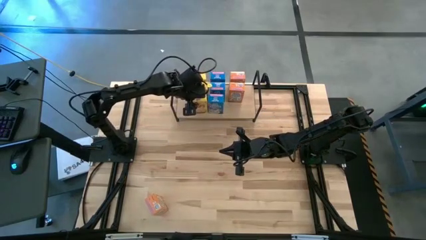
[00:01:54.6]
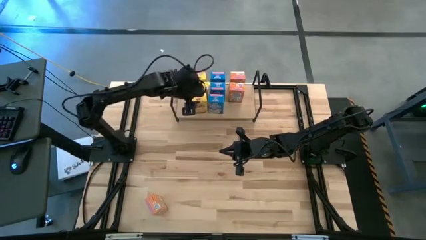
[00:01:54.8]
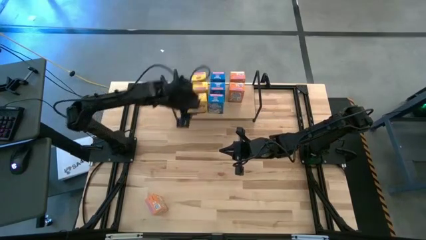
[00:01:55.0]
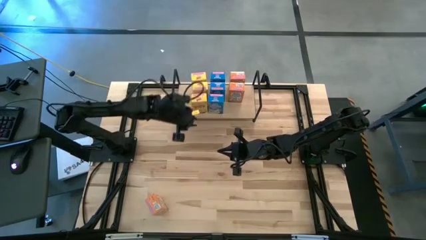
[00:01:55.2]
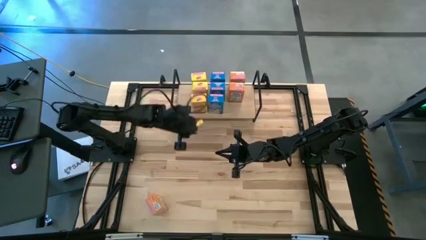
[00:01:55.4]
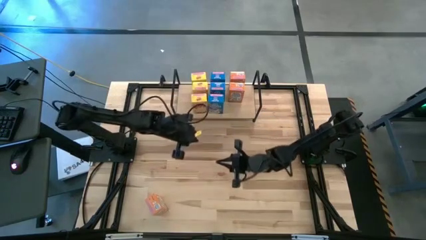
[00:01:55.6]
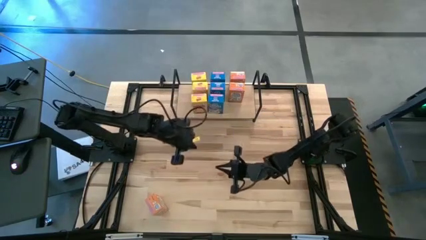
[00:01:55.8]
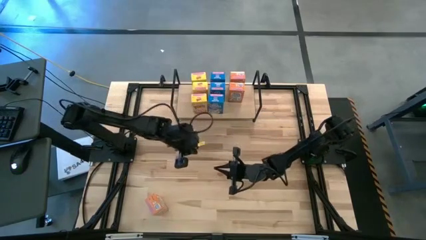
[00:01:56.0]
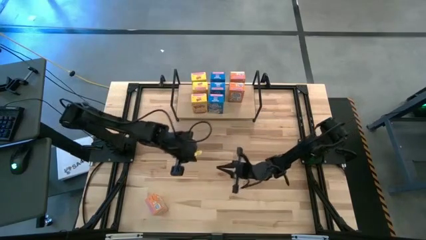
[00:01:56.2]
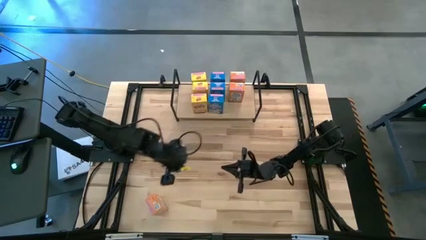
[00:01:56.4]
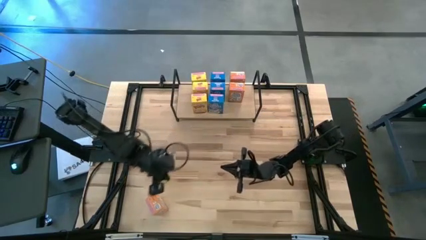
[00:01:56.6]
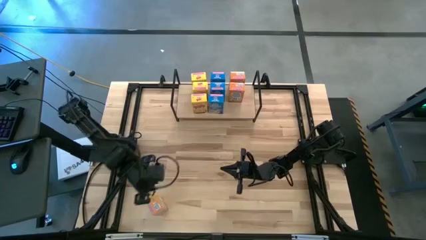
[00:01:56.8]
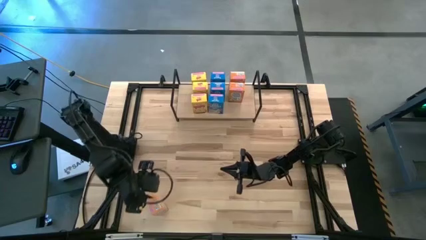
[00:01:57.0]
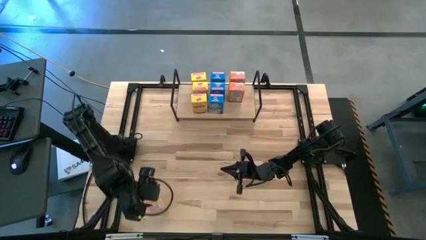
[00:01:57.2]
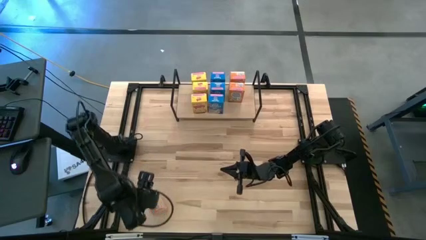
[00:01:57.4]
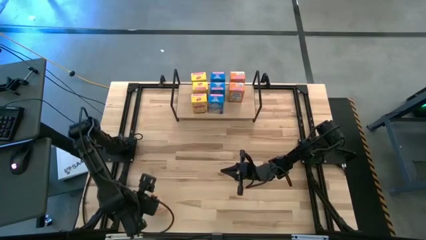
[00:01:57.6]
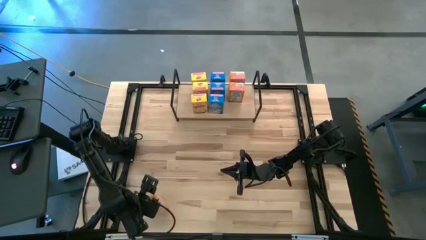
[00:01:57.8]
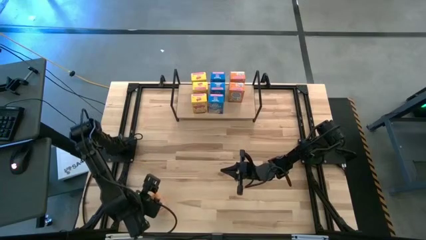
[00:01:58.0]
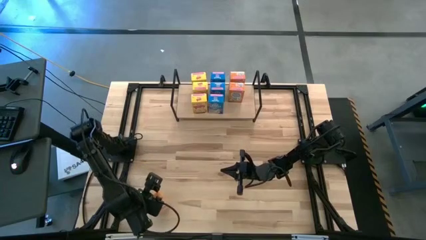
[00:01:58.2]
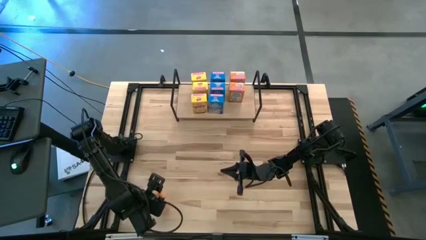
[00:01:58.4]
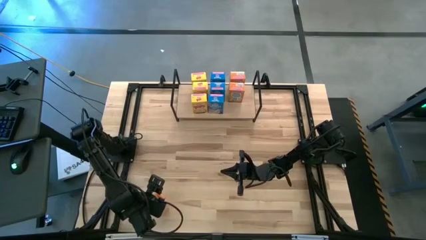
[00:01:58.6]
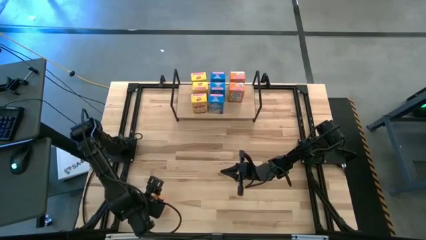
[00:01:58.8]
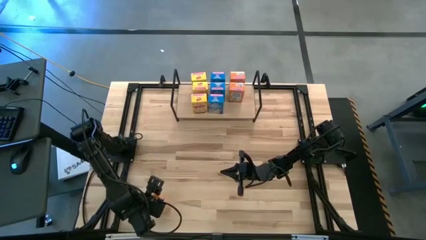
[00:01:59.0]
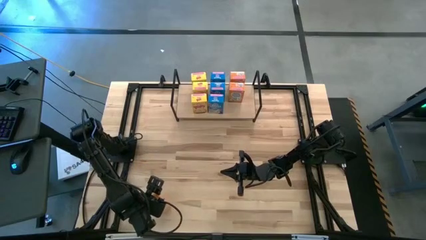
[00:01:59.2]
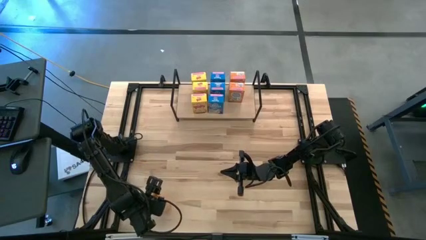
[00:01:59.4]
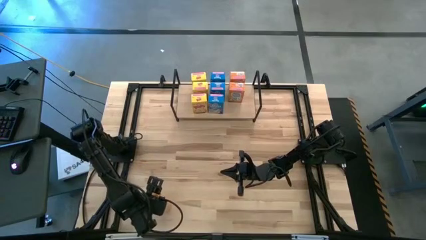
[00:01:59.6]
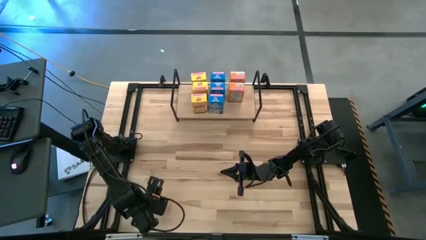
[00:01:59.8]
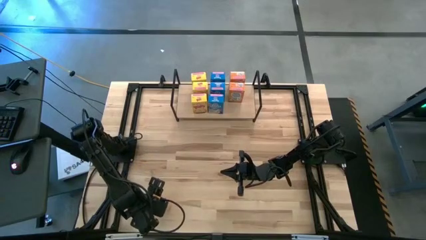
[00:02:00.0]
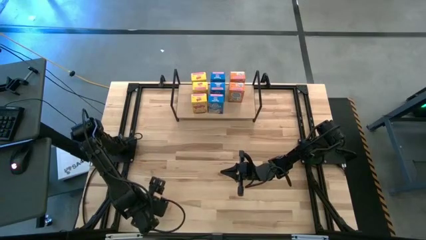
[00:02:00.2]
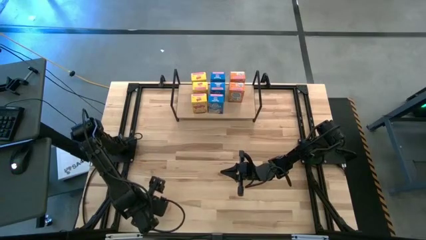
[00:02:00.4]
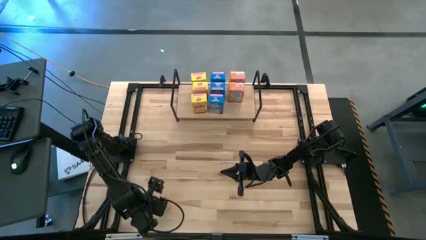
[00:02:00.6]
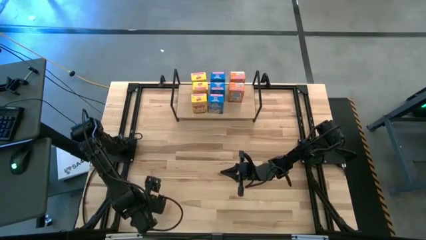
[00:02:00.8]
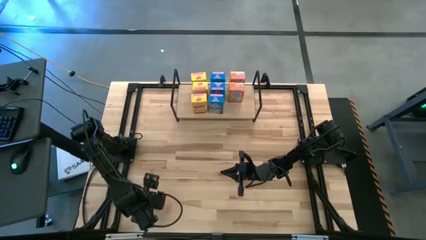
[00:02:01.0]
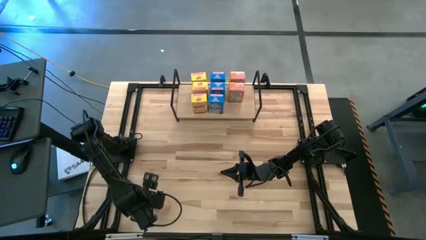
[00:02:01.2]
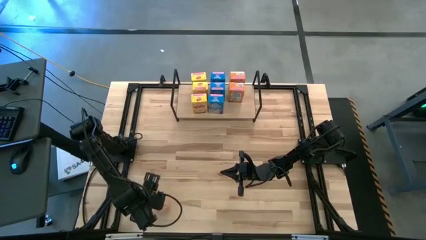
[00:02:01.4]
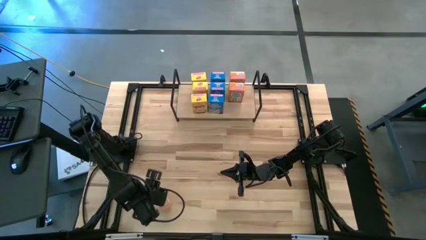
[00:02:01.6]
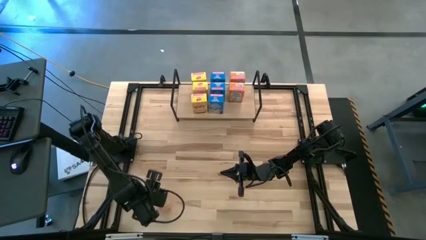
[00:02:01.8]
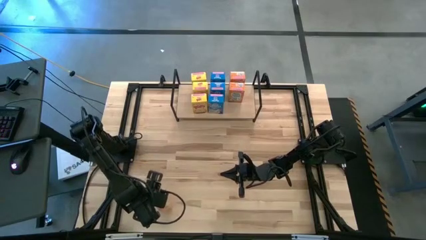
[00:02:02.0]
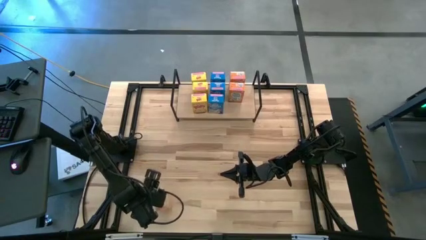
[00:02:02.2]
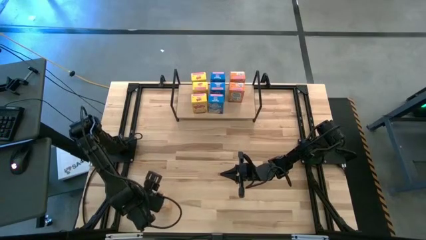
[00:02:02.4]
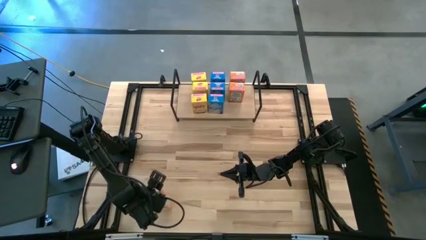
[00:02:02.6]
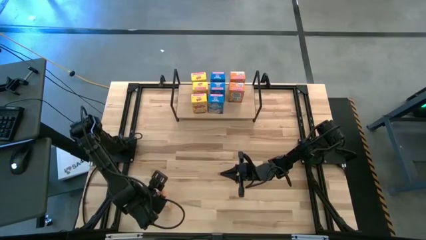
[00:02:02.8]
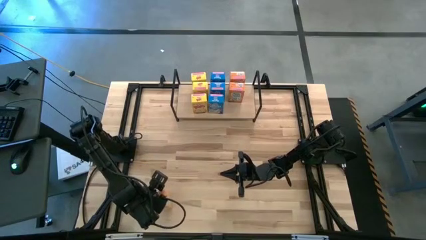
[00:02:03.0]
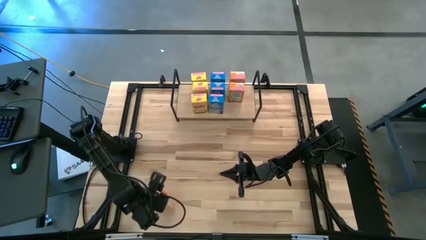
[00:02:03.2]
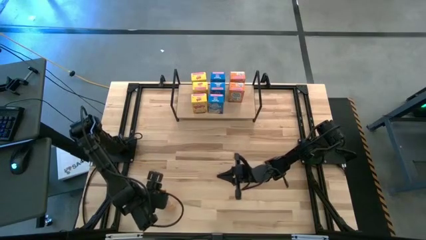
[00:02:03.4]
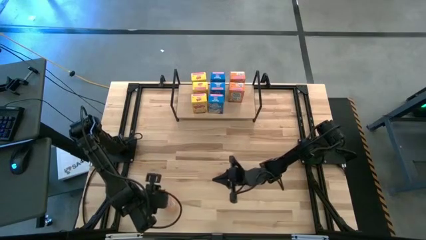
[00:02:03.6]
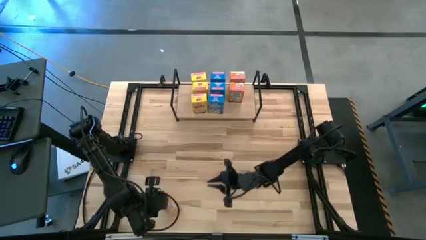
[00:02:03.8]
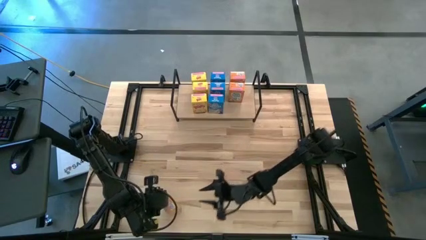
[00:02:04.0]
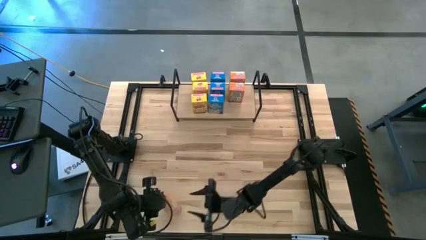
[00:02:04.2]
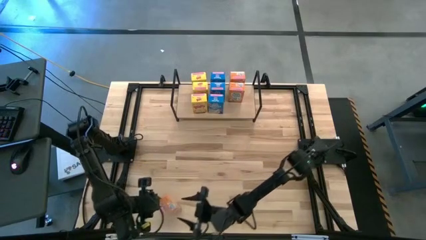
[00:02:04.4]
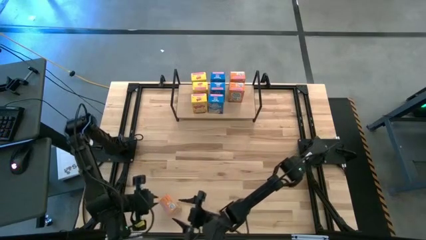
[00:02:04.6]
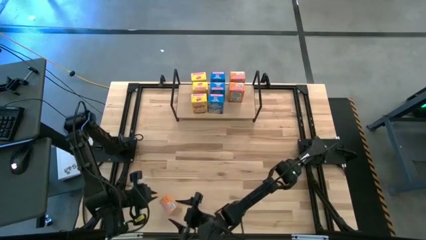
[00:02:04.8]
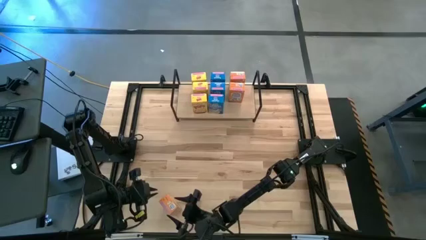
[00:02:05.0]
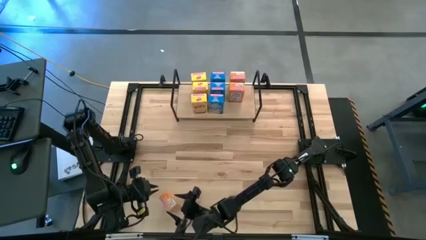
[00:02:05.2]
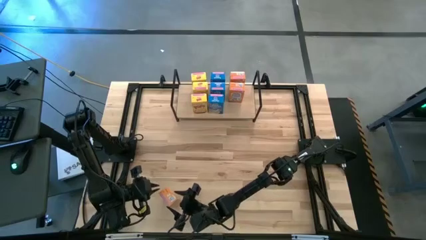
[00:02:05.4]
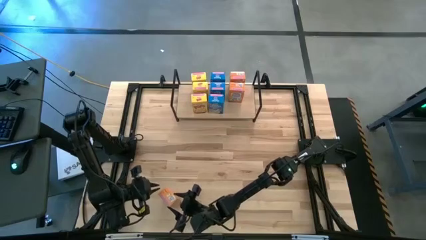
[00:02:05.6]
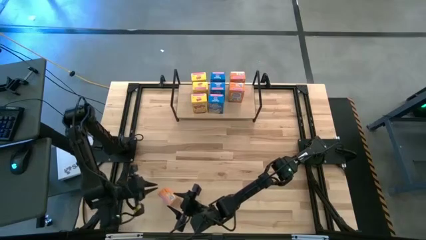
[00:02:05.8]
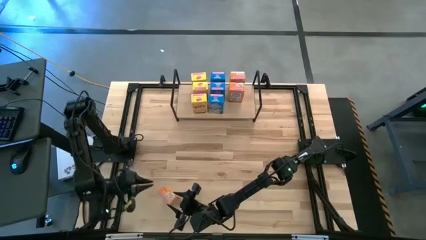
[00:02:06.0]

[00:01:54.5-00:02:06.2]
Task: Stack cereal on shelf
Put the orange cereal box on the shelf aligned with the other orange cereal boxes
